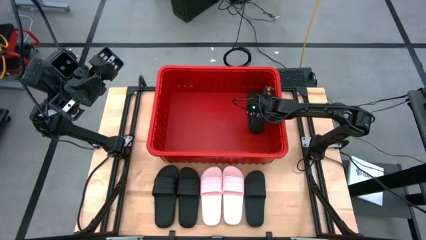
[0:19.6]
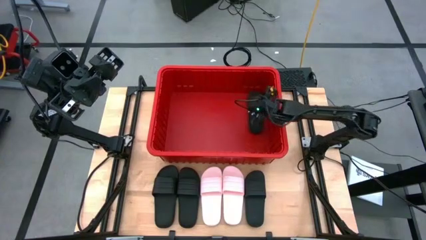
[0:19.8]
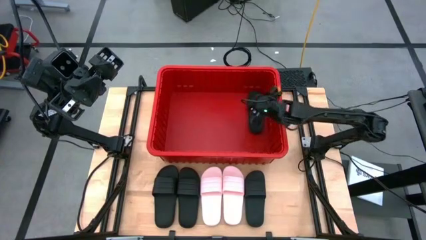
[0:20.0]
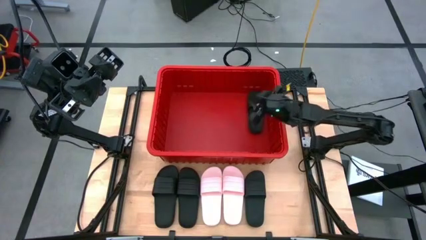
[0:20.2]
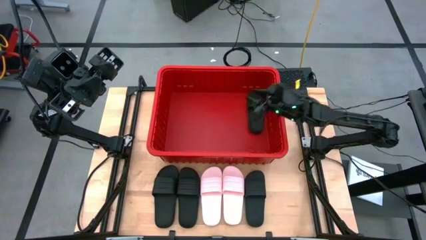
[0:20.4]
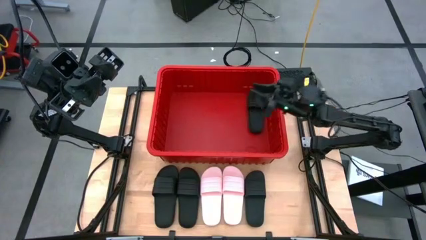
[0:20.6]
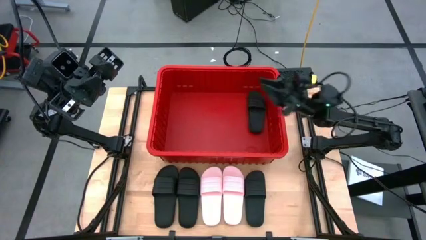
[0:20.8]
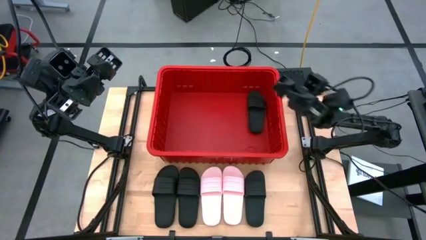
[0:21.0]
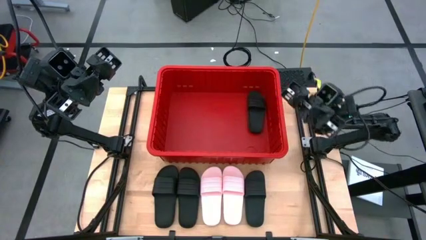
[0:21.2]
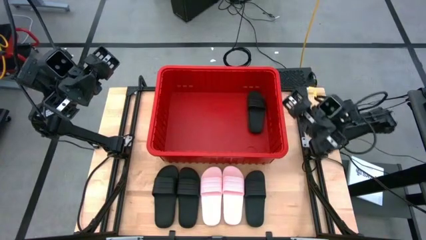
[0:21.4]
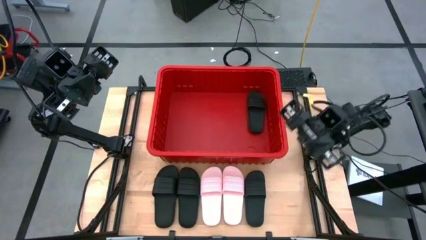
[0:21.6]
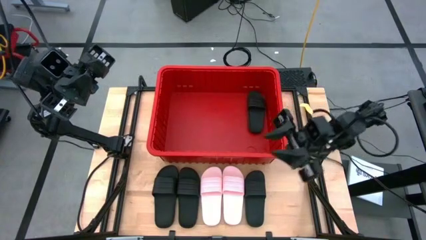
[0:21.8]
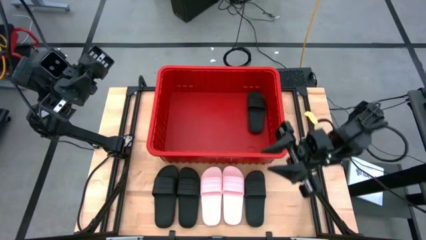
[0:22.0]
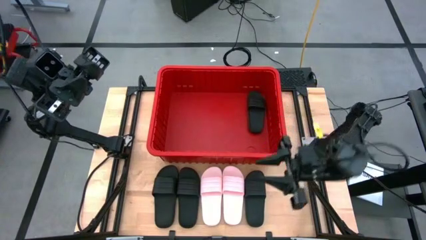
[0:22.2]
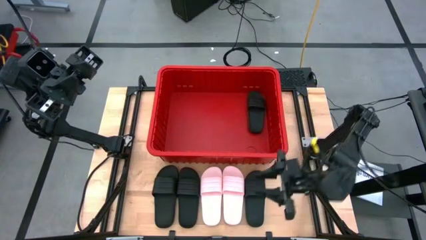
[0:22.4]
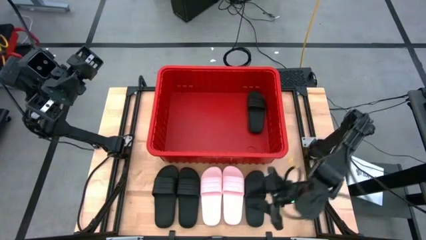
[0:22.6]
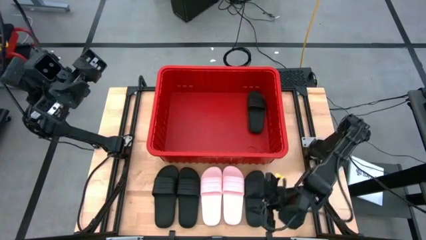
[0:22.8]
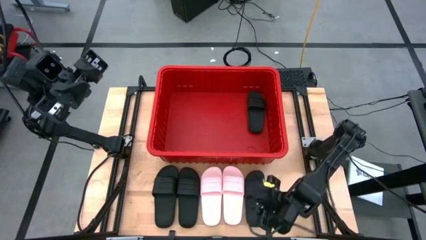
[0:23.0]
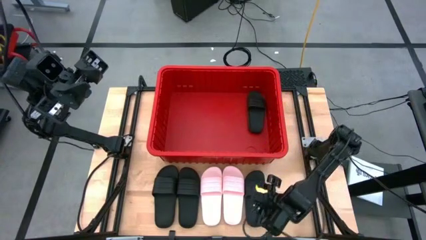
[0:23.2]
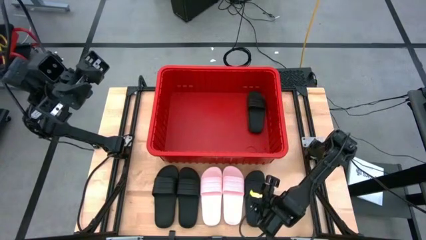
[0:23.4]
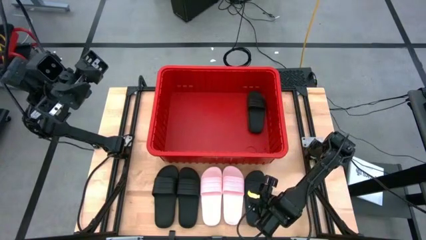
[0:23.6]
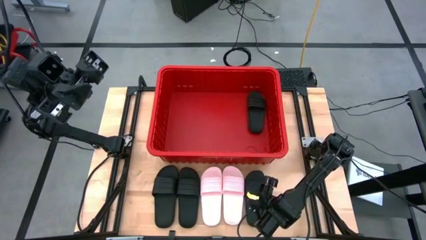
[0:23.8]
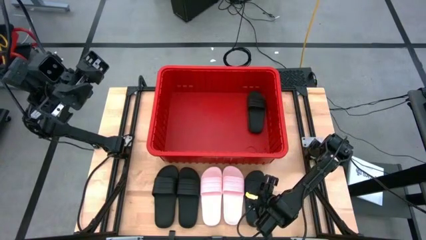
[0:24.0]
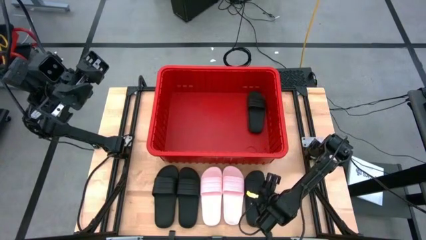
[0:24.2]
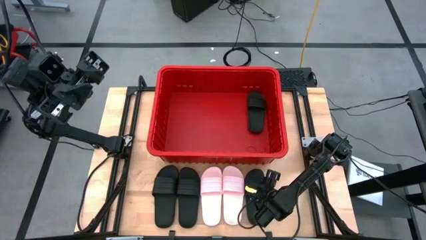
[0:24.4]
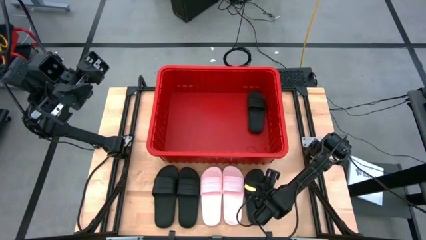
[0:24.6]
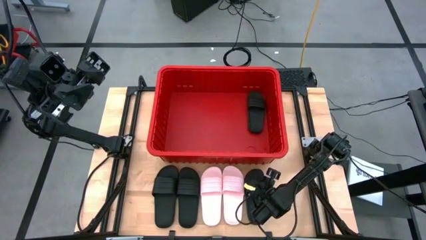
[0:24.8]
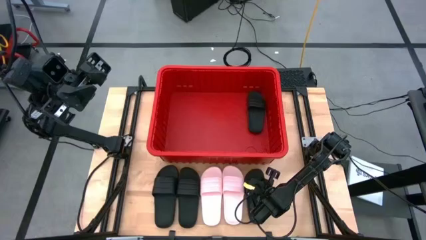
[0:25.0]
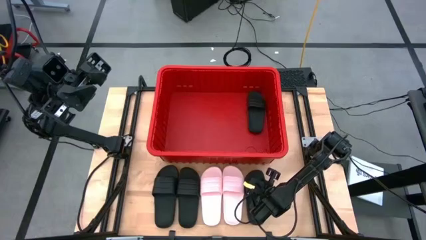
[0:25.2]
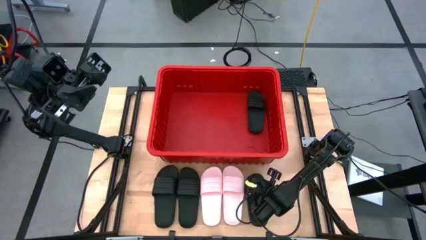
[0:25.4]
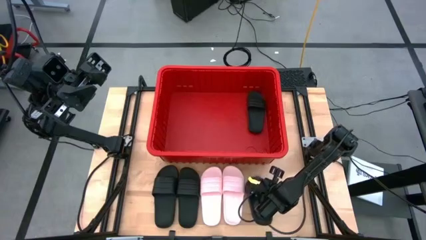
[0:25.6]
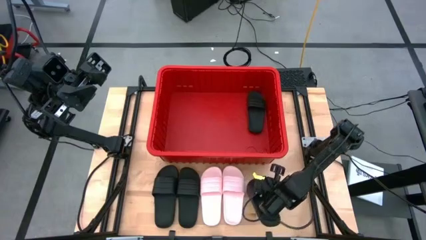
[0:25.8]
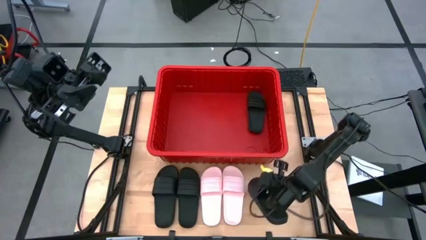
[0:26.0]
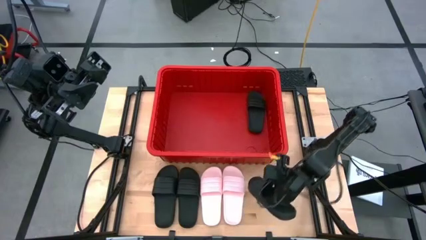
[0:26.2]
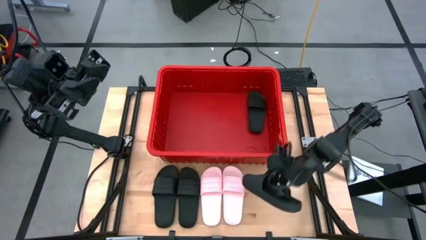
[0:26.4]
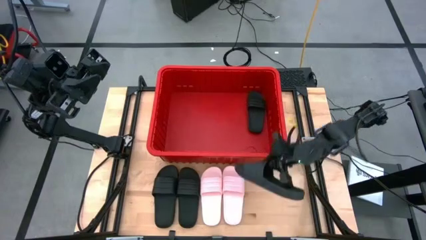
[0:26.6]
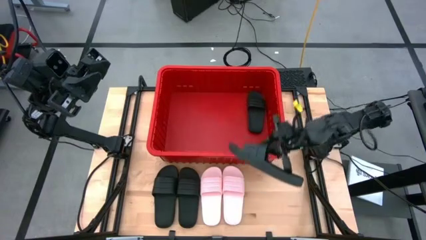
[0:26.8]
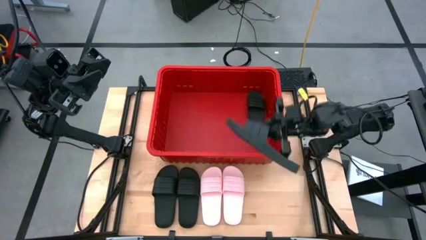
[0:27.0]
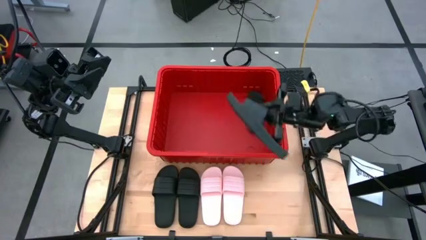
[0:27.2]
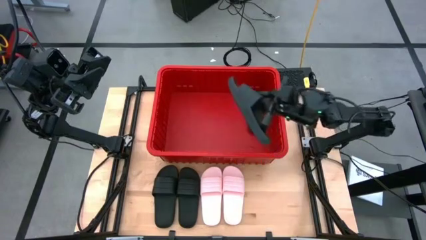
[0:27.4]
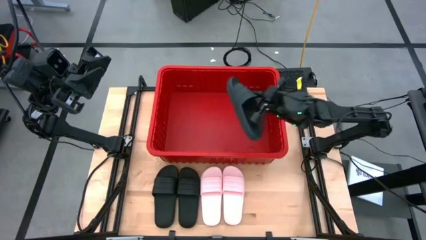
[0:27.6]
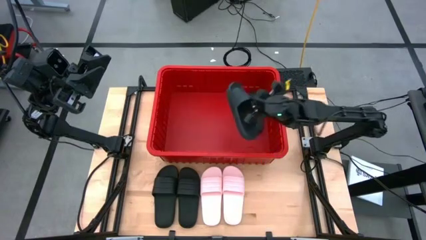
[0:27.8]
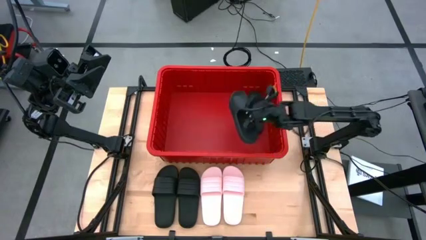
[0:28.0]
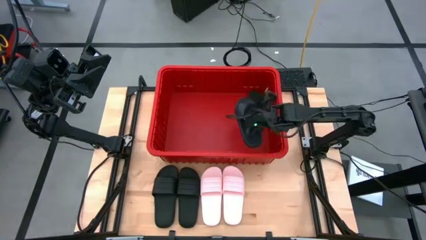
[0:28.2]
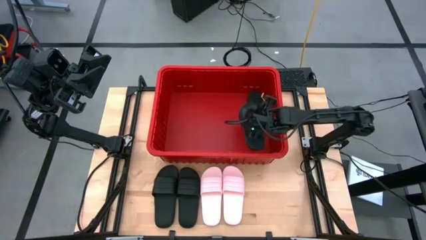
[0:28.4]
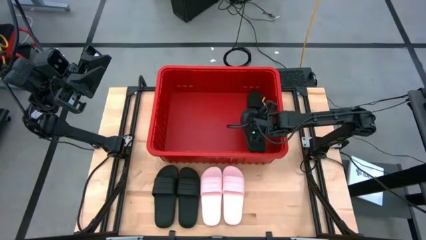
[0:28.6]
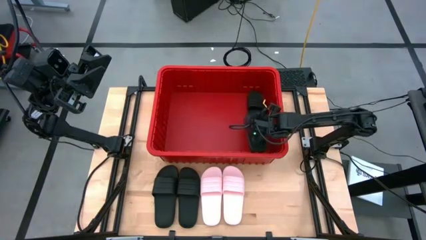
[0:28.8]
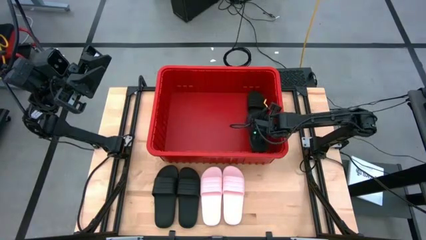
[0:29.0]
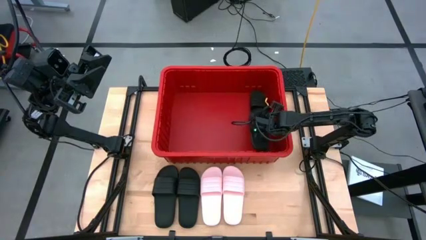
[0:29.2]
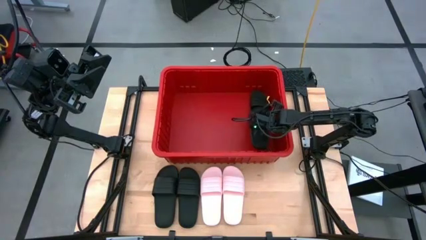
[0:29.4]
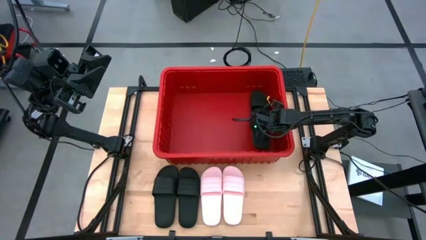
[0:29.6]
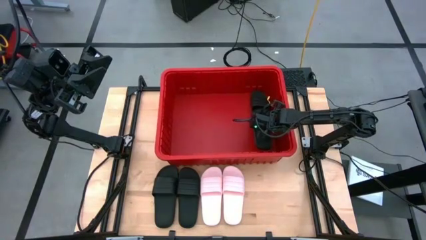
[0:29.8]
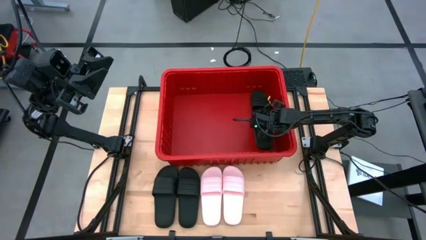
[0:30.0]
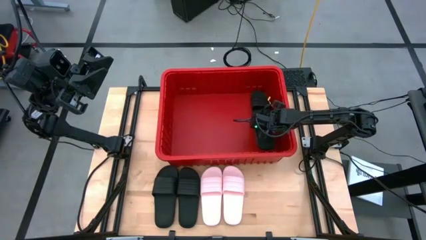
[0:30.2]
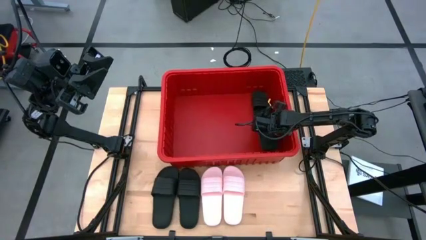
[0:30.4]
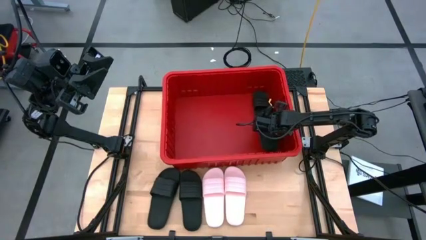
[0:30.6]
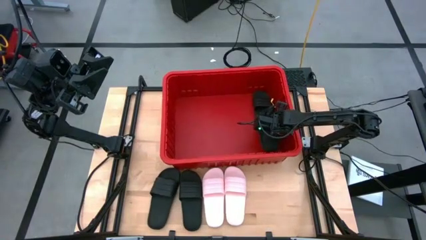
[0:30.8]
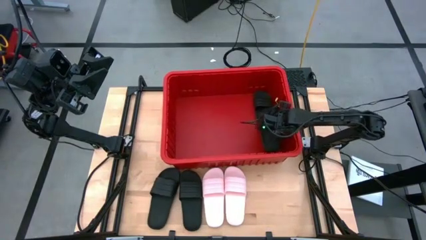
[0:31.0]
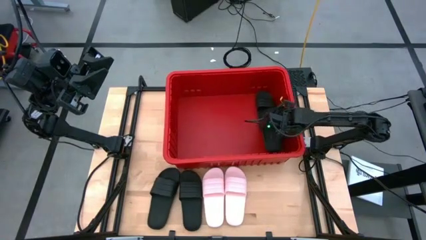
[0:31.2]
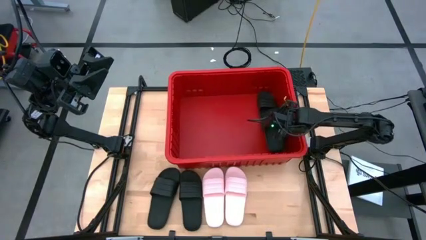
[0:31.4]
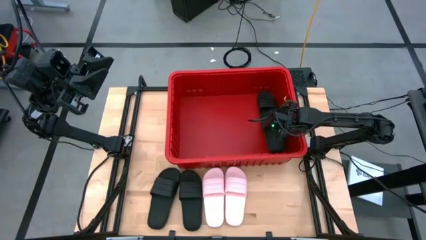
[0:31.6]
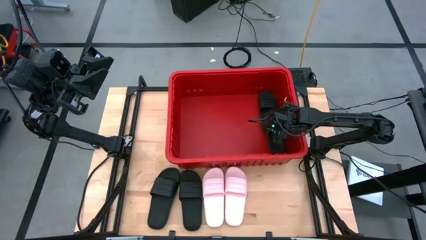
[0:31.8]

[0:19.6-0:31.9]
Task: Pick and place slides into bin
Put the right black slide into the red bin

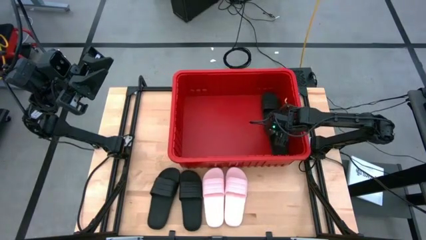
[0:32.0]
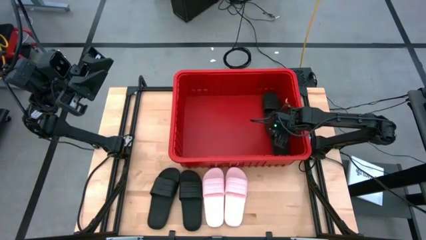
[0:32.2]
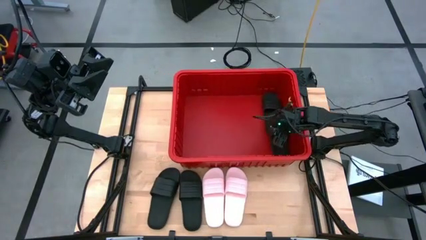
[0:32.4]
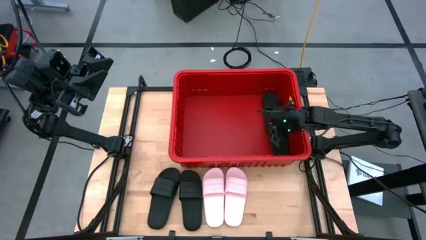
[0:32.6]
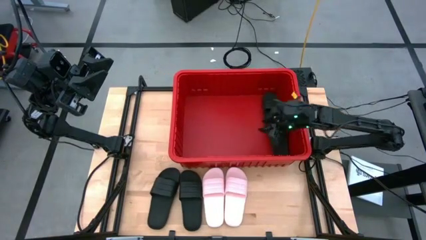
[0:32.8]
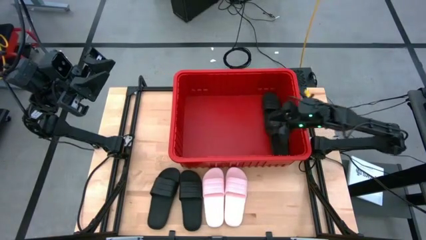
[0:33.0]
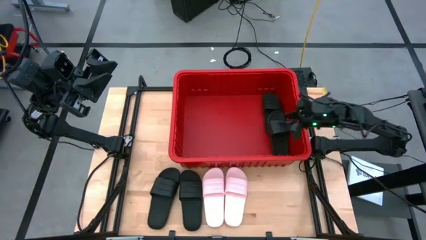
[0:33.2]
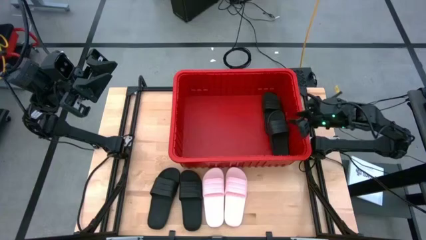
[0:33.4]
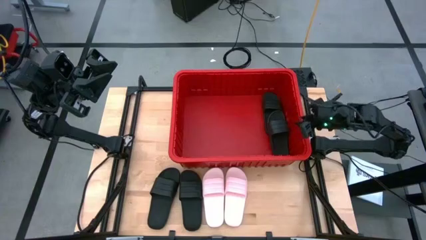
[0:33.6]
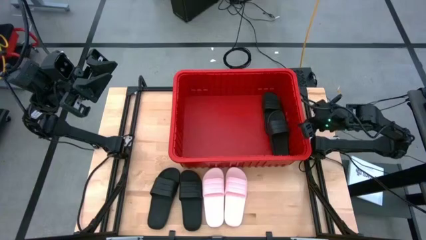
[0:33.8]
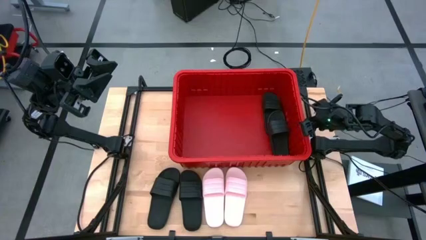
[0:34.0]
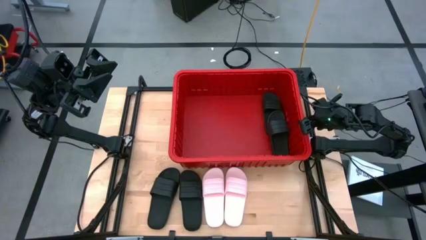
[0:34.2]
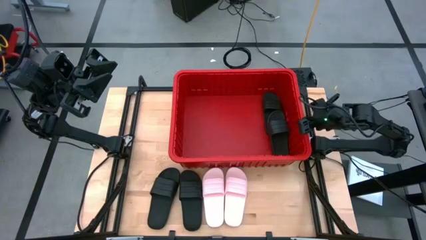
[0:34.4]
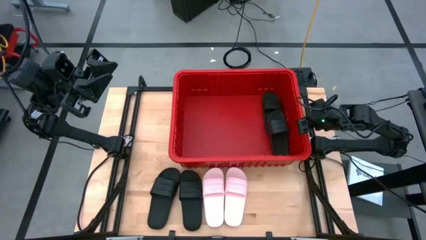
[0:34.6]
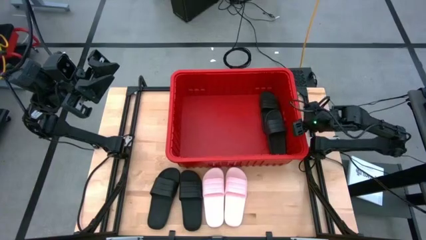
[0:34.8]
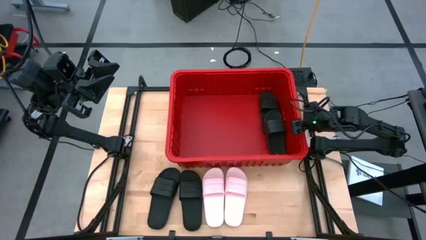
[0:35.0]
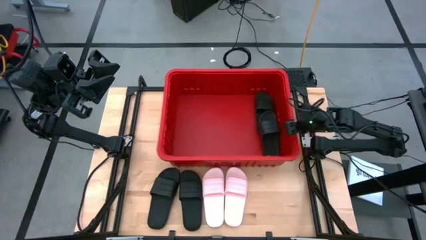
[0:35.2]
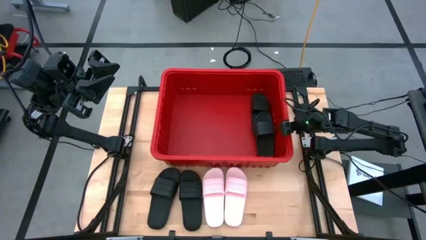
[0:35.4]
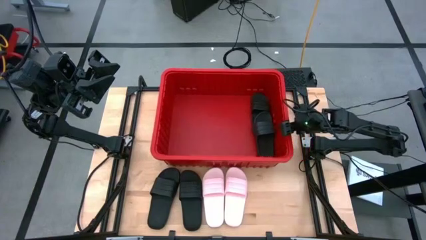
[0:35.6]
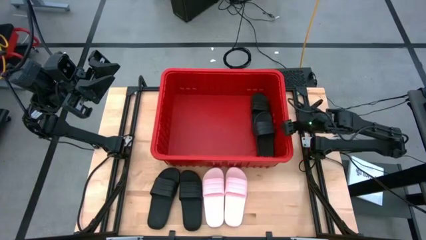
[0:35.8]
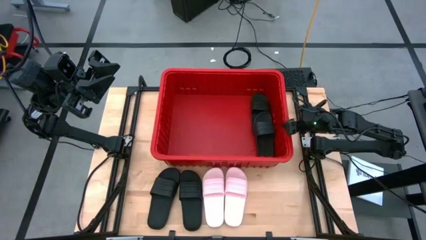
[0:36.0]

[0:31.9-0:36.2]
Adjust the red bin on the table
